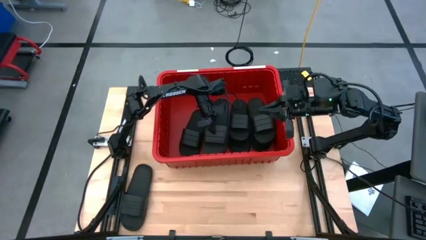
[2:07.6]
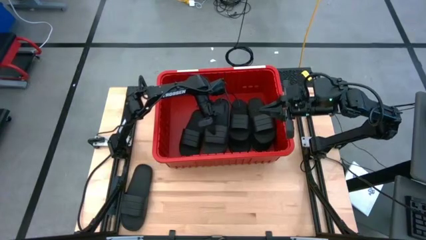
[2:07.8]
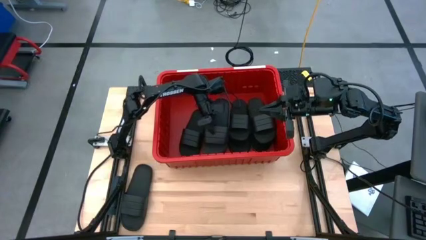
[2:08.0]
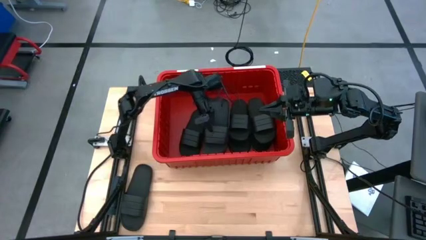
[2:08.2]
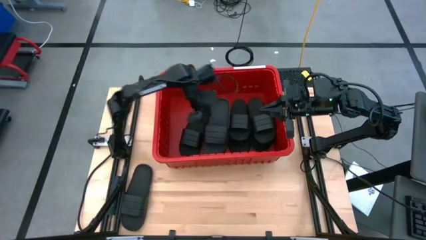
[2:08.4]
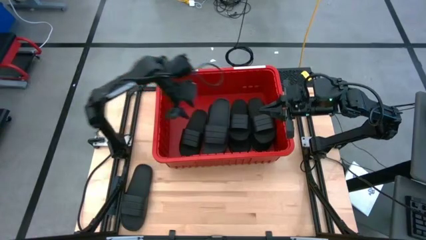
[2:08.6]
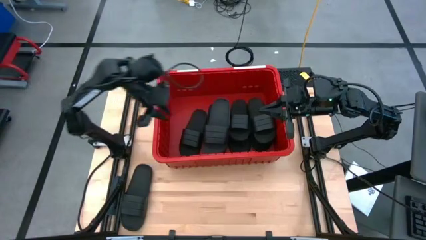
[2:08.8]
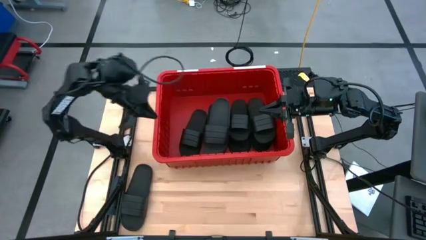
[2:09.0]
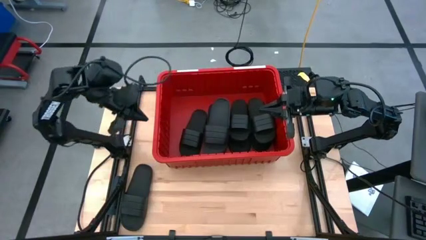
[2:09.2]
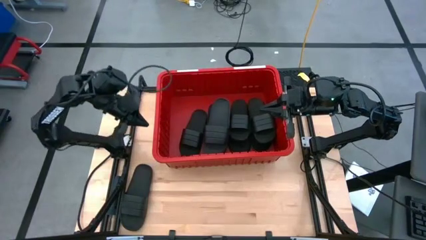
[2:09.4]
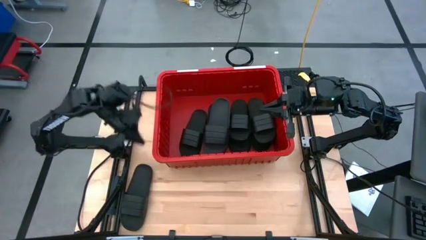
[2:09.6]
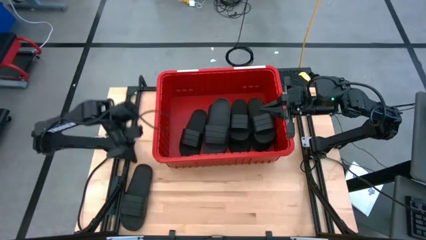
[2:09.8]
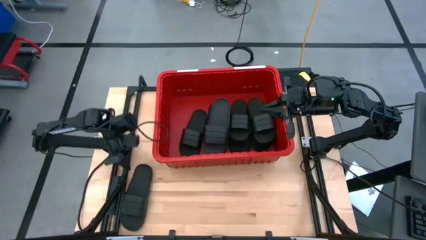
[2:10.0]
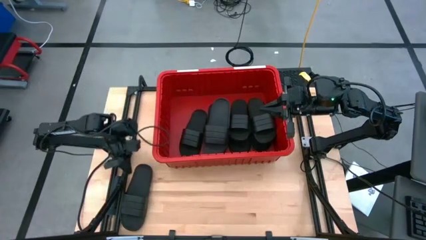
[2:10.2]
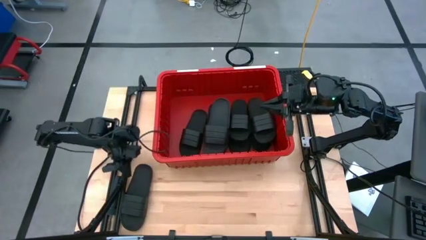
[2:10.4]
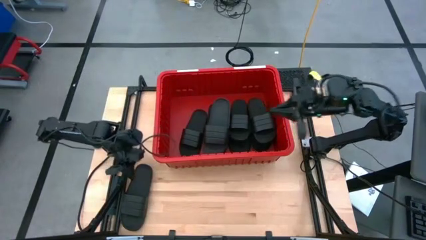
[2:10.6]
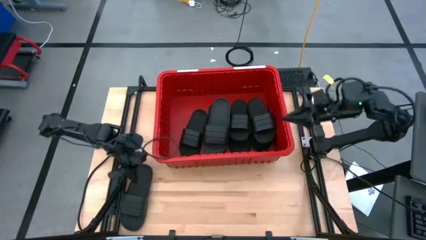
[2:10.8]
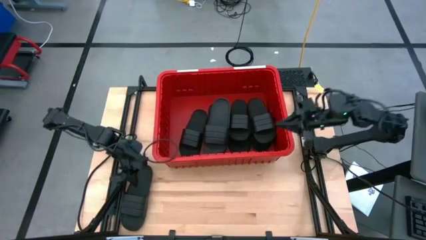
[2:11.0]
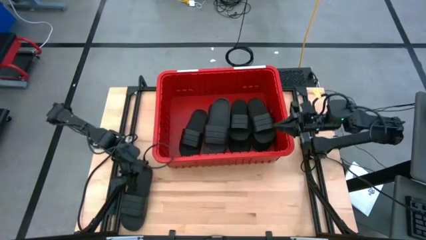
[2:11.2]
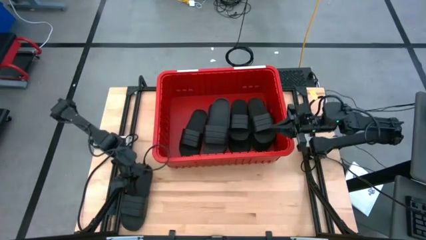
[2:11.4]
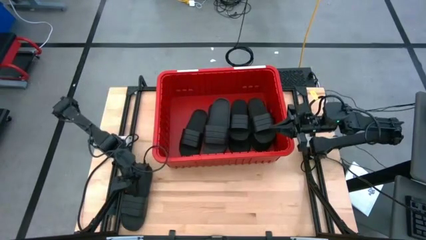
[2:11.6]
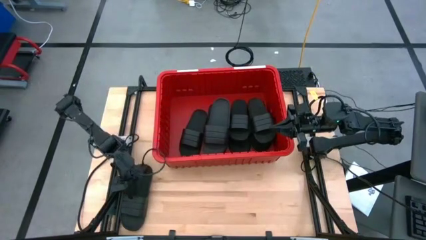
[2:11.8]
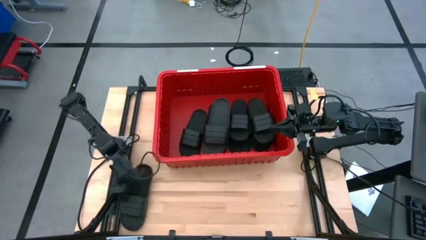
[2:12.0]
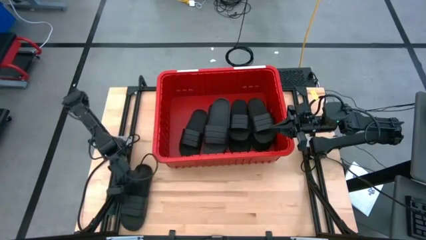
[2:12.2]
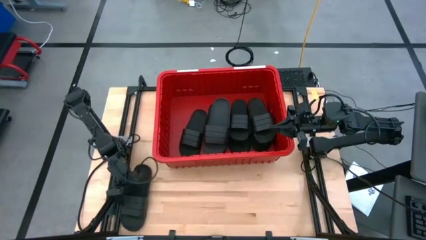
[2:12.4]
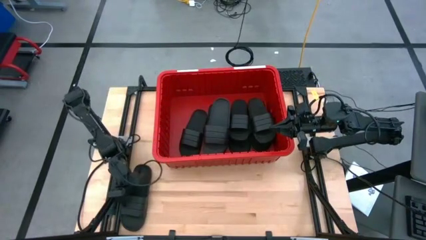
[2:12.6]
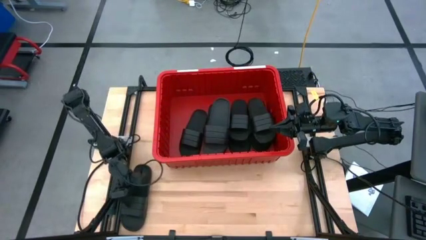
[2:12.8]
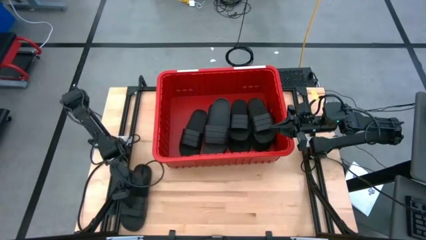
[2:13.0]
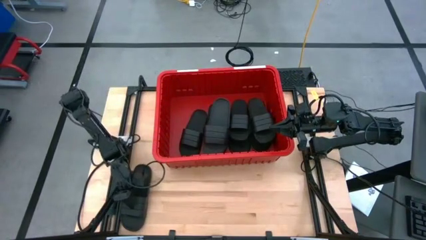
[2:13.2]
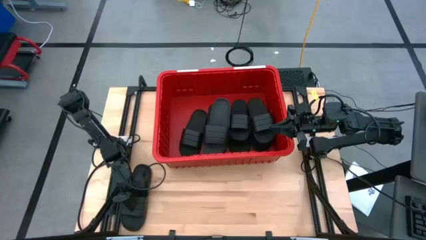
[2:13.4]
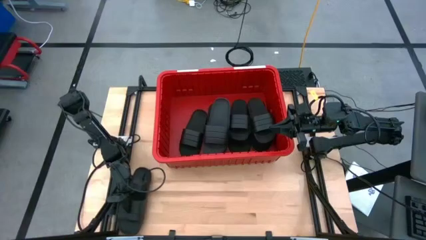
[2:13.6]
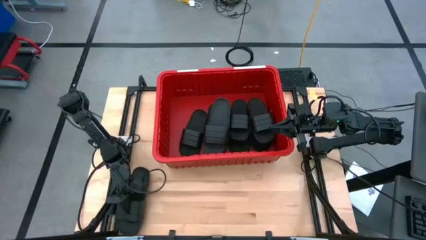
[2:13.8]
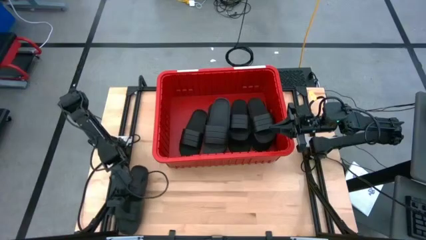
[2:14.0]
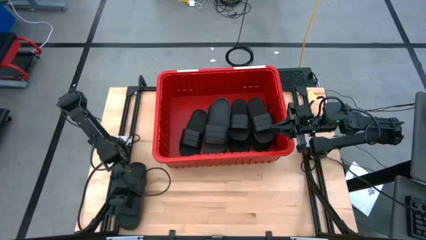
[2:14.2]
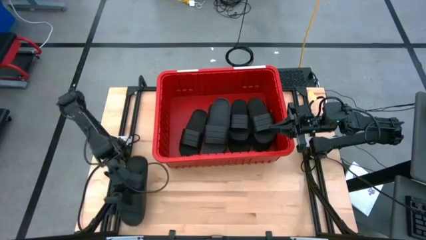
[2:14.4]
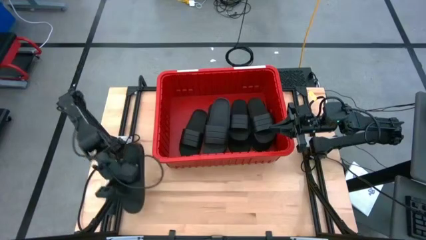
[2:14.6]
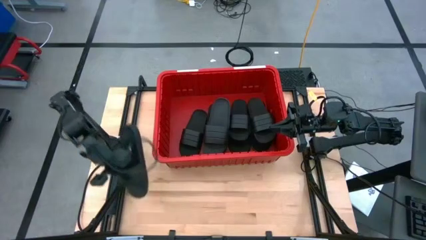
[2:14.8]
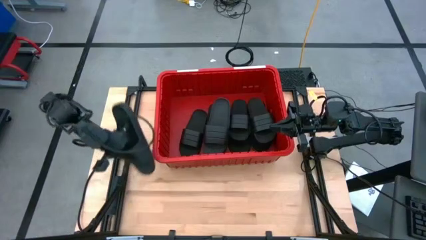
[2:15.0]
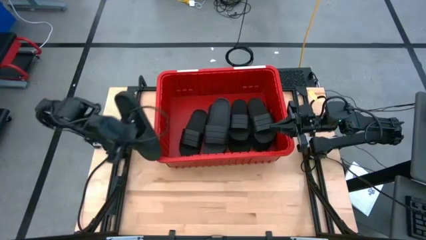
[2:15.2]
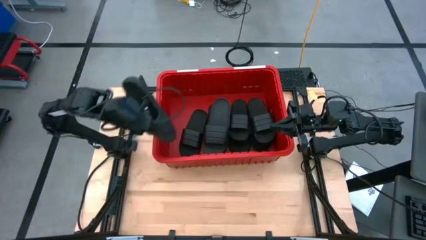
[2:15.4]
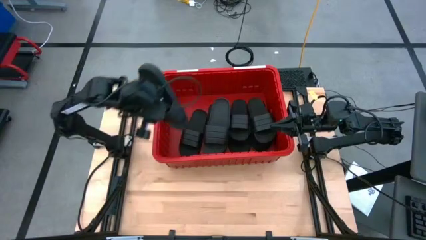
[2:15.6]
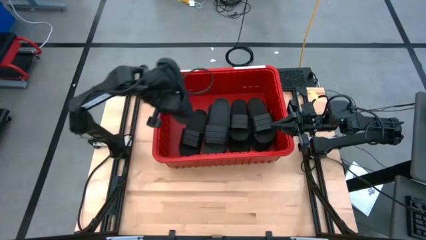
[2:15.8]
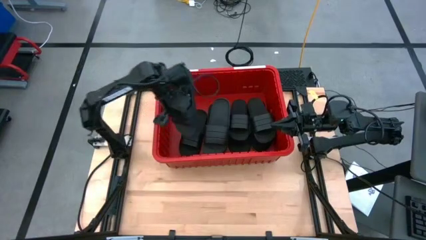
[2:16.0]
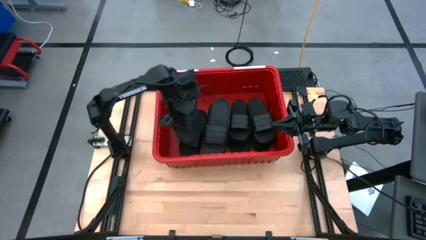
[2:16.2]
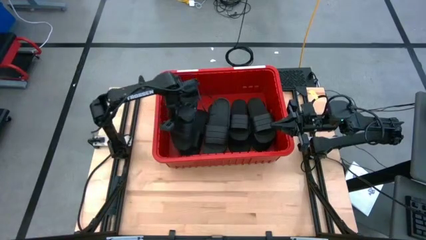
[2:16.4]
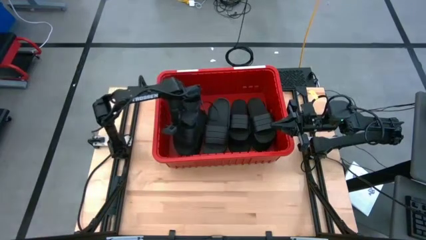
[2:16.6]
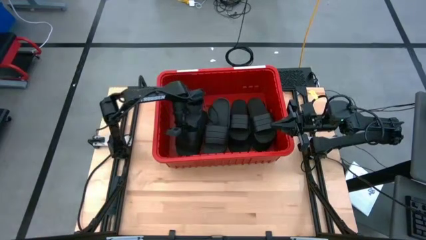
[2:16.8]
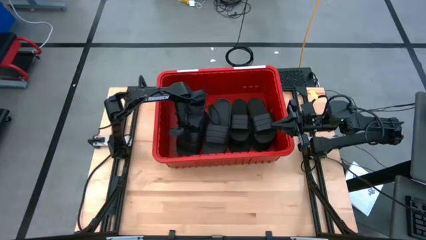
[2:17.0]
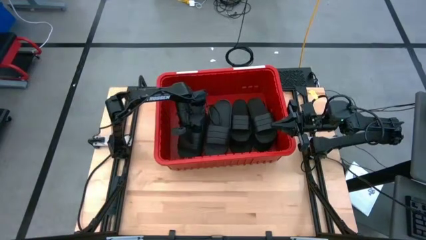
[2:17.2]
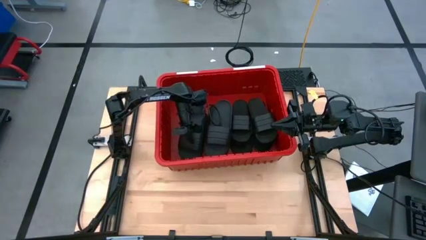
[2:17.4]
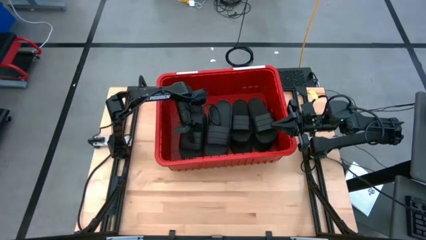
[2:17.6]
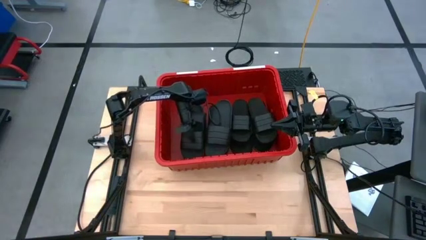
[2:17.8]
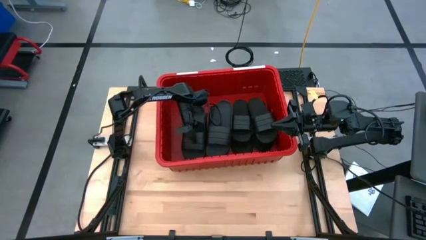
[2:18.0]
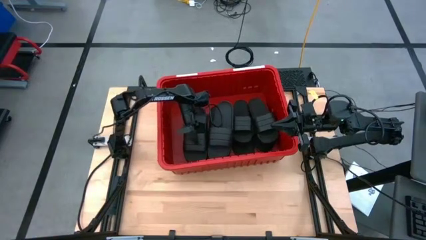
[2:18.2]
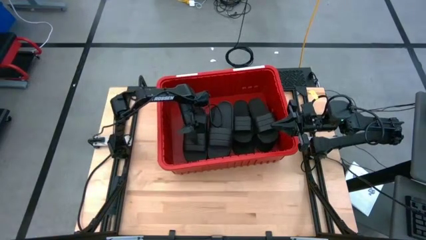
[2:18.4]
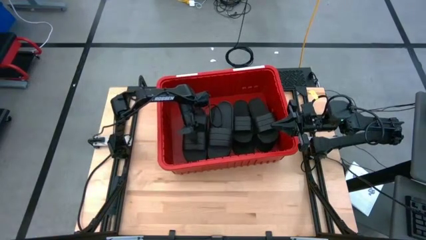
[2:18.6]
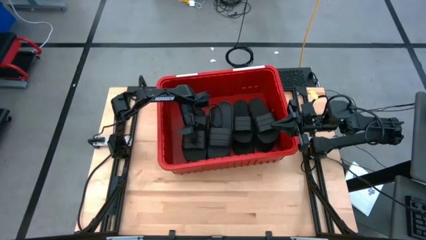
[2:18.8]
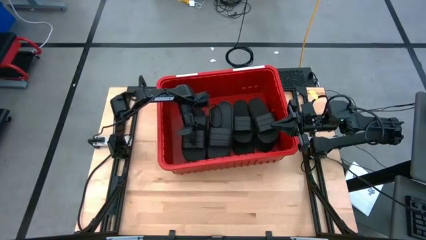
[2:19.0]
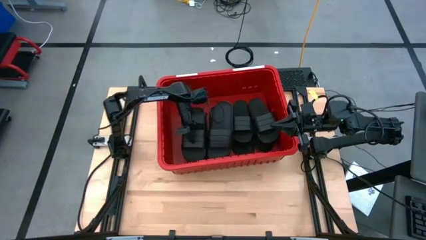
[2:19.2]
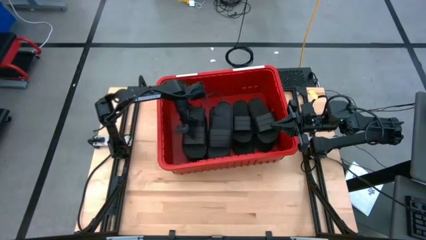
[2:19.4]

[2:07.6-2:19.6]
Task: Pick and place slides into bin
Put the black slide into the red bin

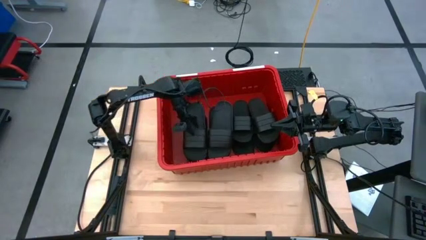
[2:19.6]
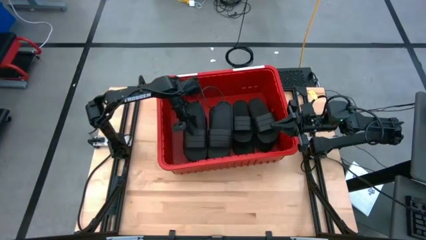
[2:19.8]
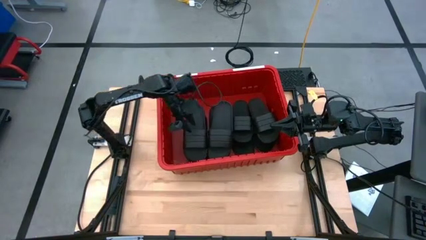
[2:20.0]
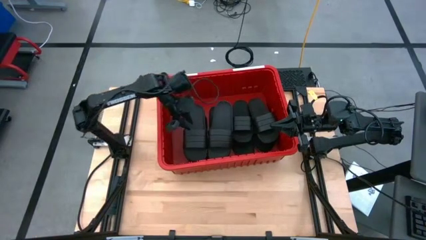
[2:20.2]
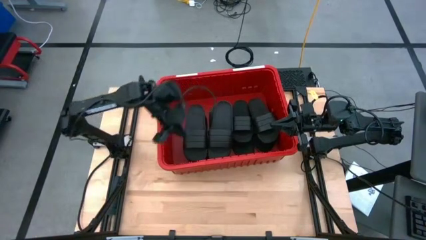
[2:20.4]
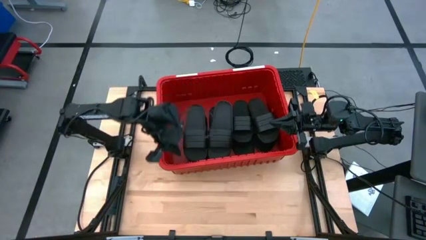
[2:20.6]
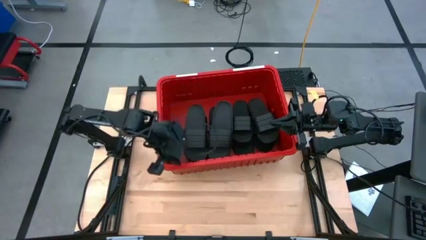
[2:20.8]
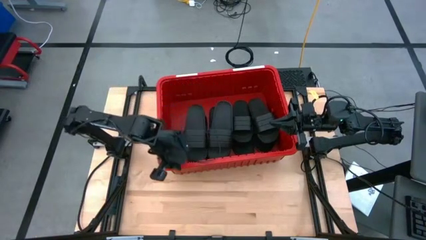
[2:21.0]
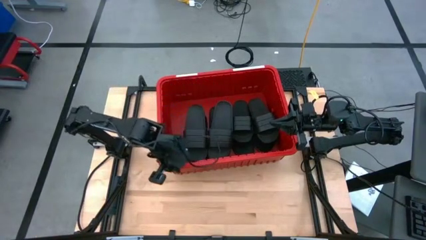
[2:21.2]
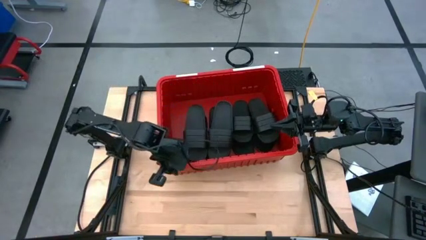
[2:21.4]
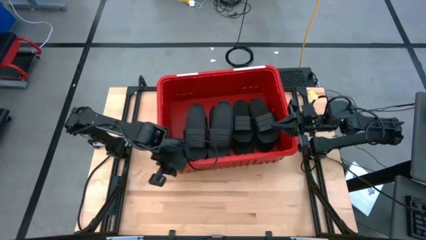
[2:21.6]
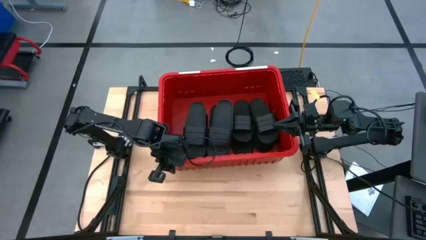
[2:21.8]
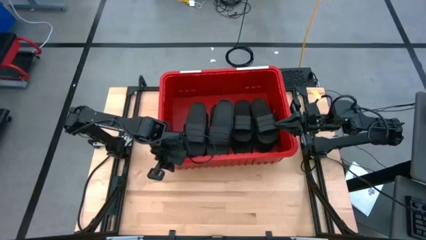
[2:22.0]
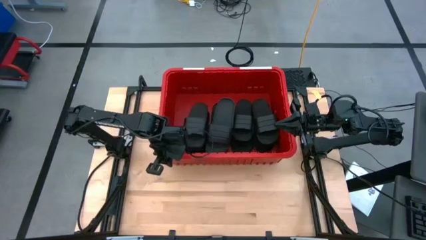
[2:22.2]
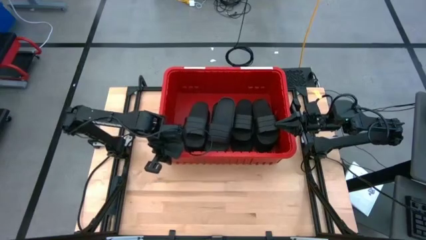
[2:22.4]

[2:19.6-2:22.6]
Adjust the red bin

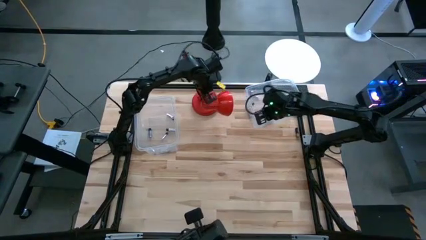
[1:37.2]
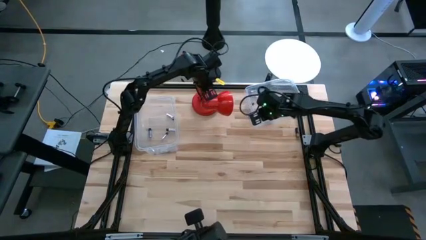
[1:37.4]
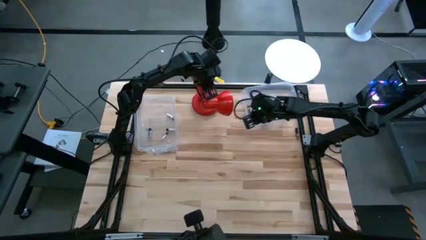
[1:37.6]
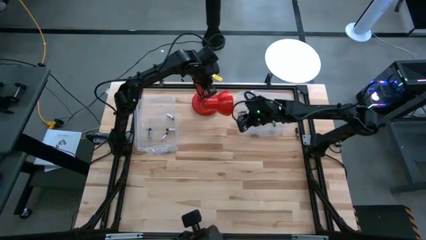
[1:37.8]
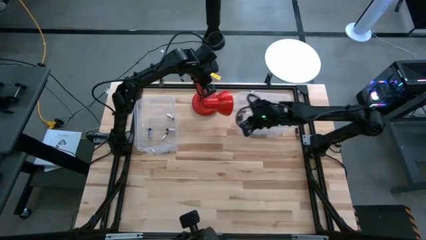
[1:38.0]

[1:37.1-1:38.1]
Task: Sort batteries
Adjust the right transparent bin
